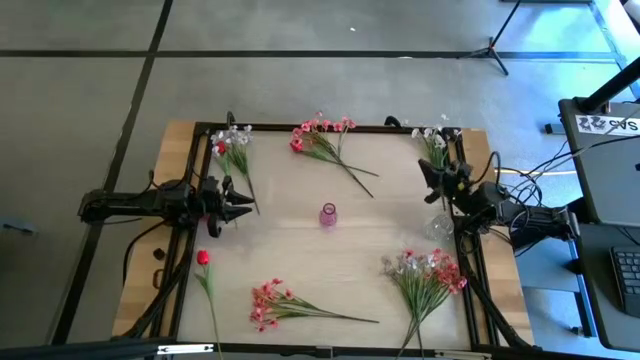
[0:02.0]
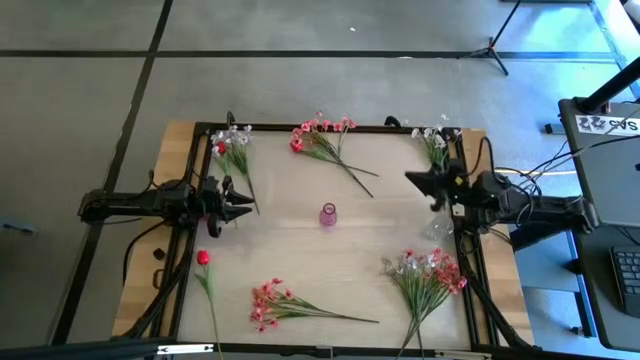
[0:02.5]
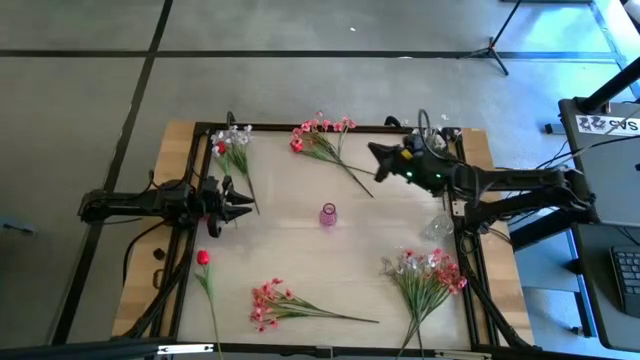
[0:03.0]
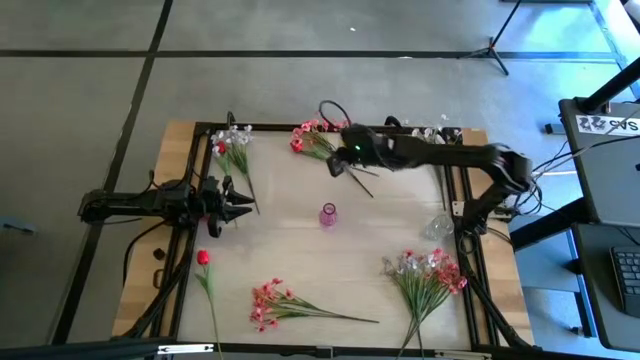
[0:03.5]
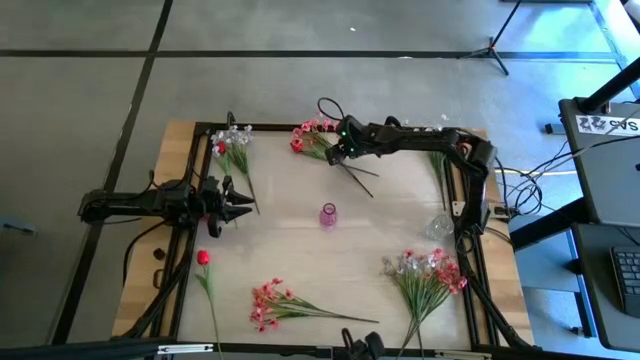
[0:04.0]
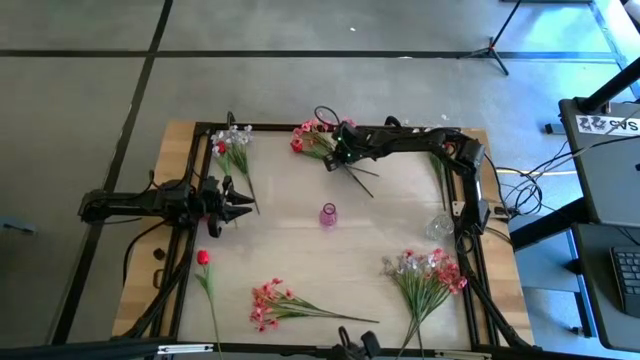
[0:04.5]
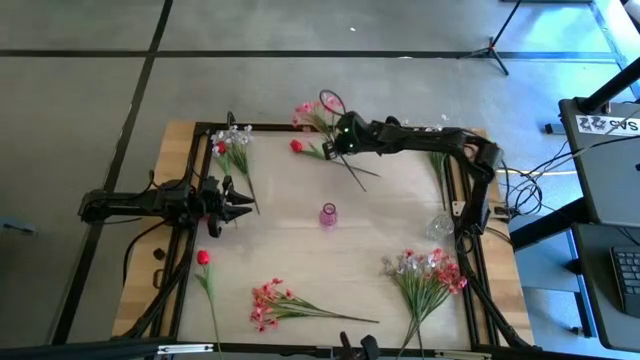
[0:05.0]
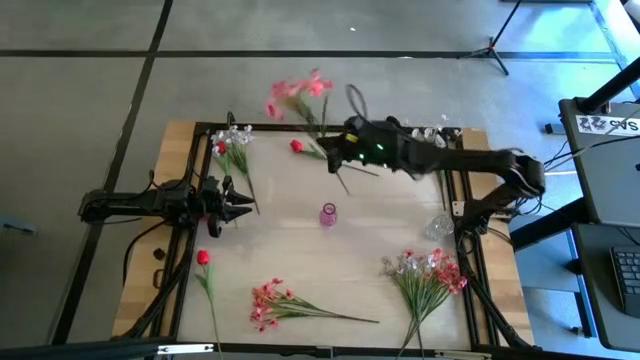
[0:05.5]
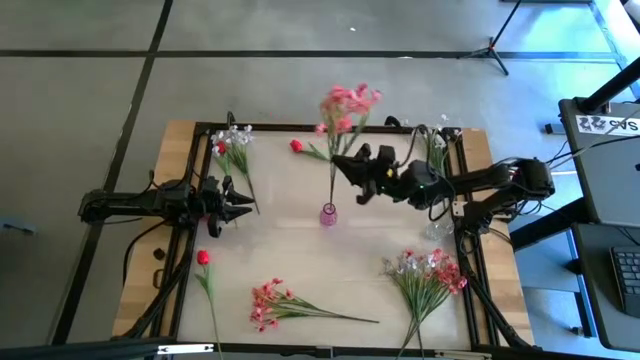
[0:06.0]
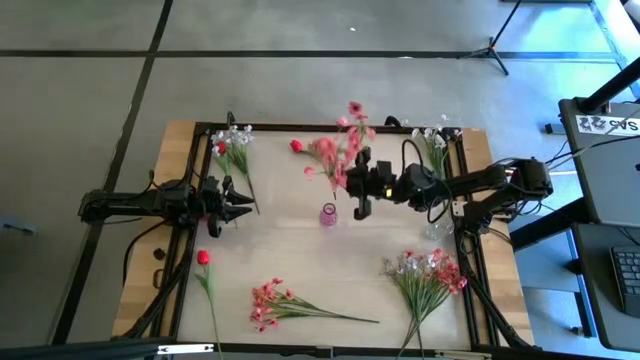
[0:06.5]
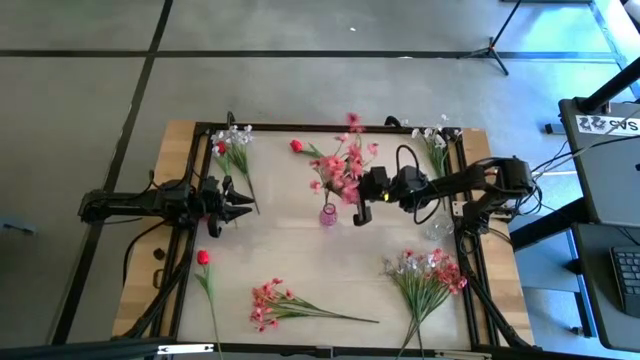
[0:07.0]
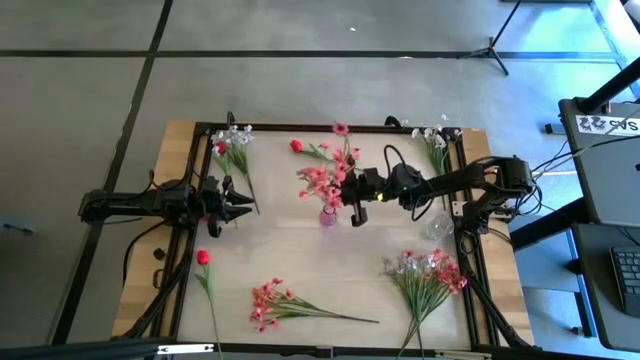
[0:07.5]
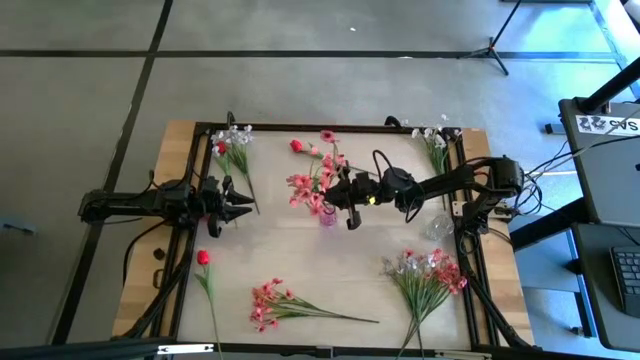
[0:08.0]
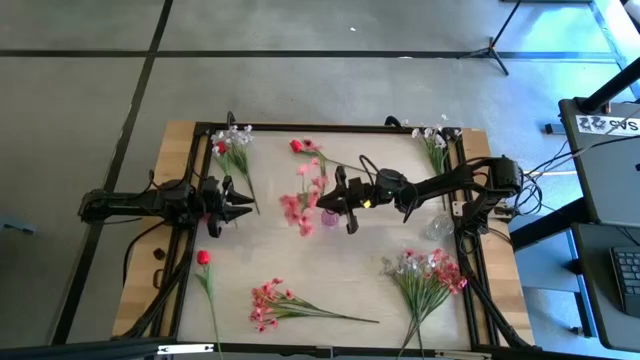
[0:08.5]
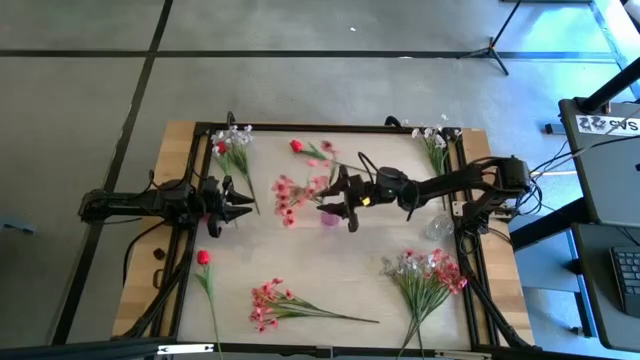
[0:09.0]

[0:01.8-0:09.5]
Task: Sort flowers into vase by color
Put the top pink flowers into the violet vase

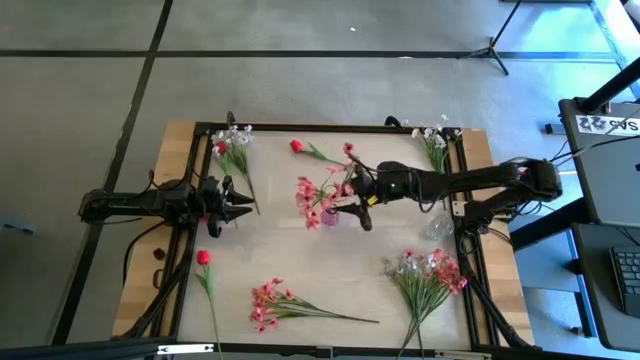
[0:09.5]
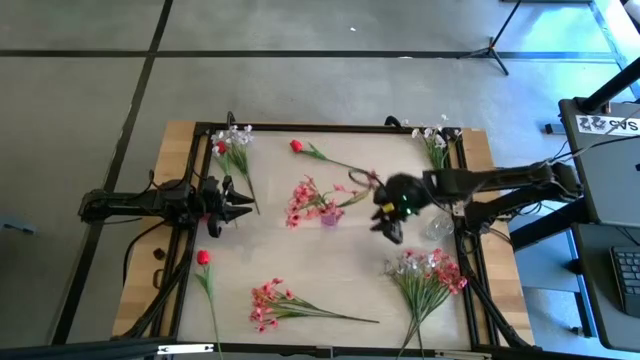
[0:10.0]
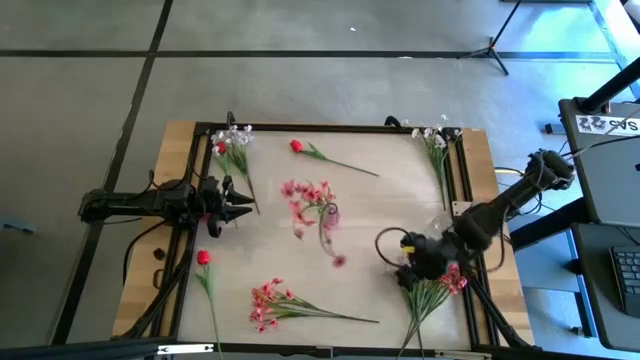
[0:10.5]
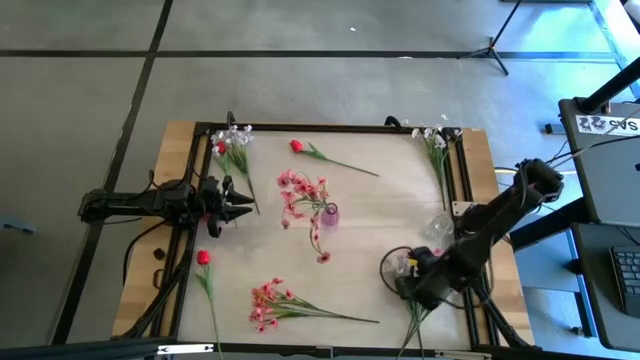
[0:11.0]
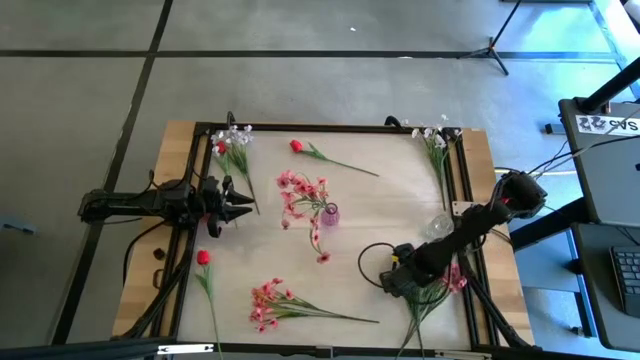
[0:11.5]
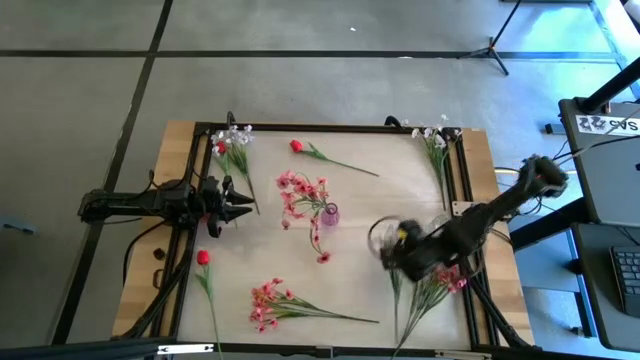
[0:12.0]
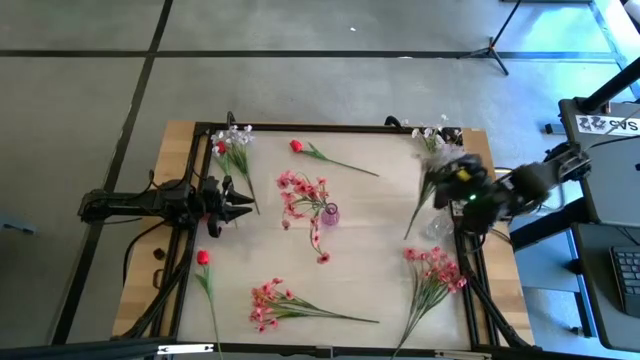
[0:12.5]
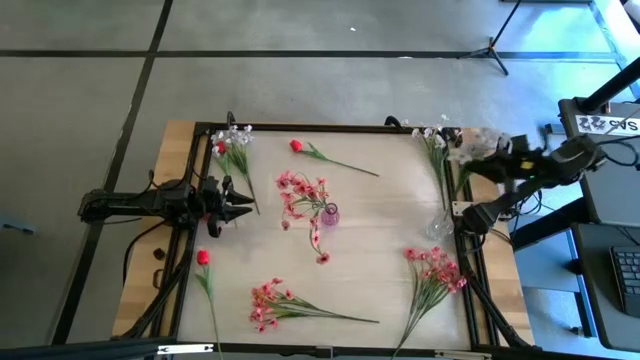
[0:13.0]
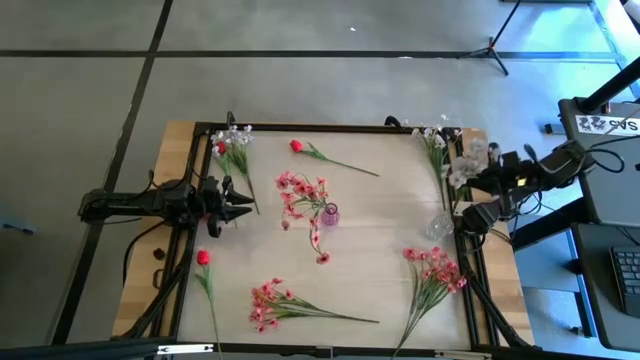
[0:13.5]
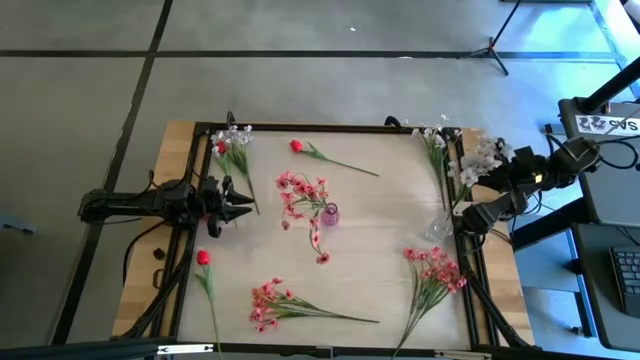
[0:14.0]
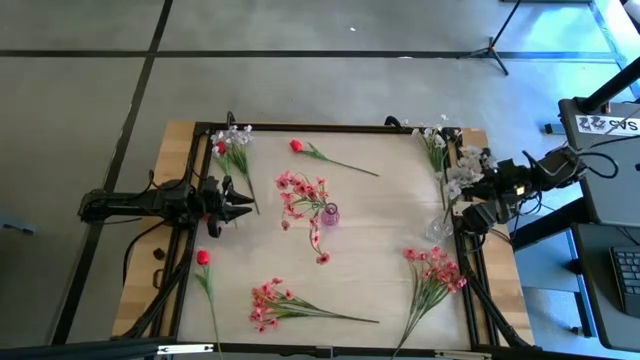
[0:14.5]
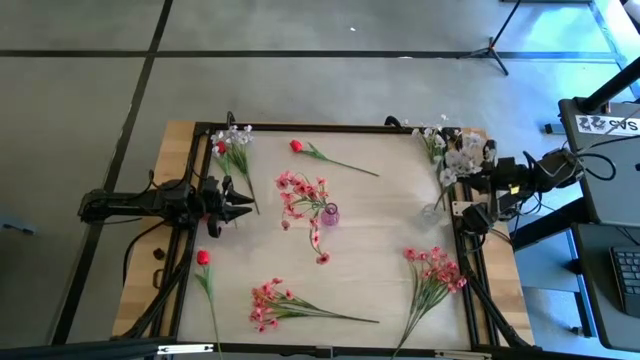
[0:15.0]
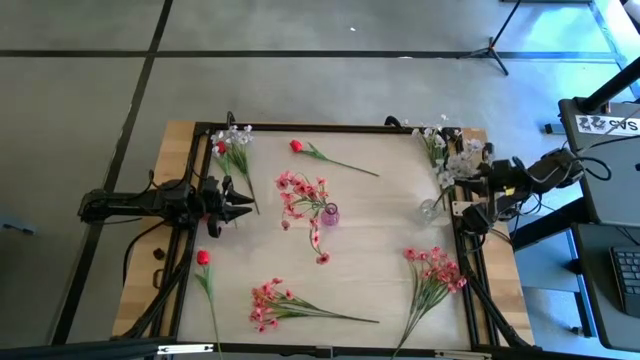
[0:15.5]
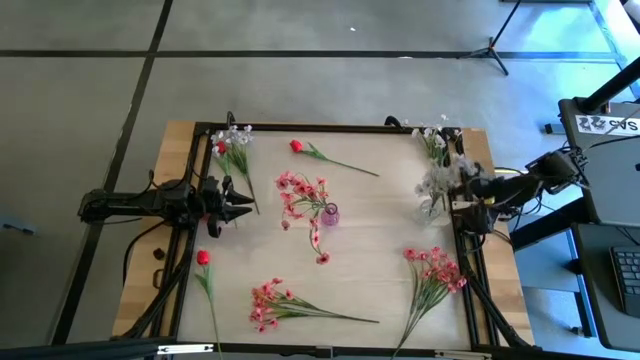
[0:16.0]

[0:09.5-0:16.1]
Put the bottom white flowers into the transparent vase

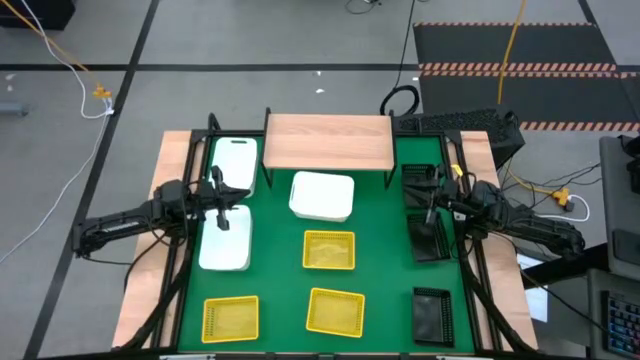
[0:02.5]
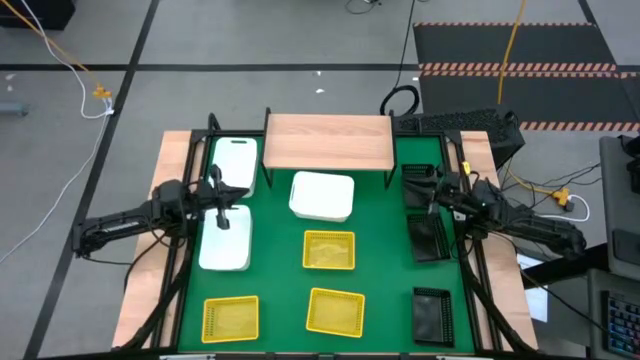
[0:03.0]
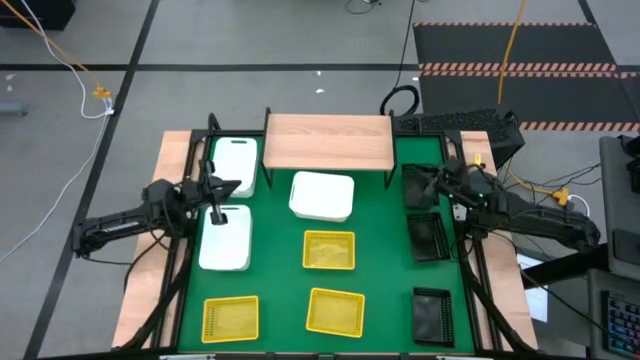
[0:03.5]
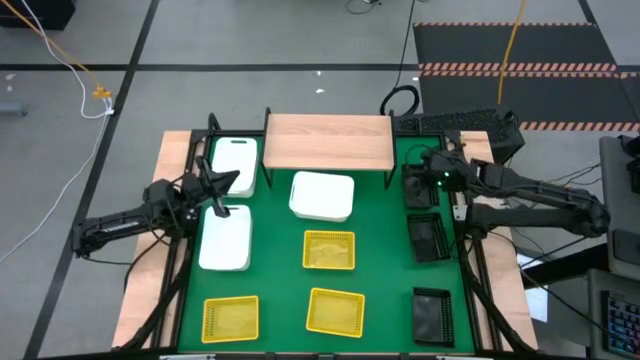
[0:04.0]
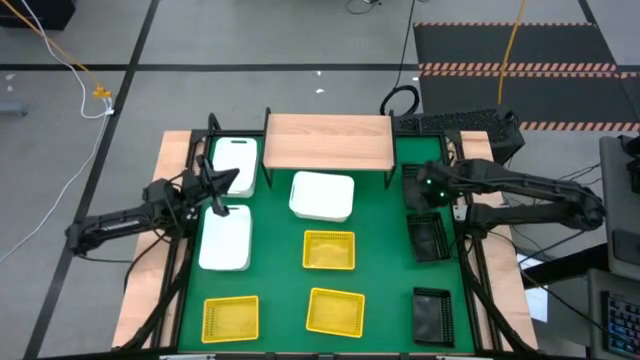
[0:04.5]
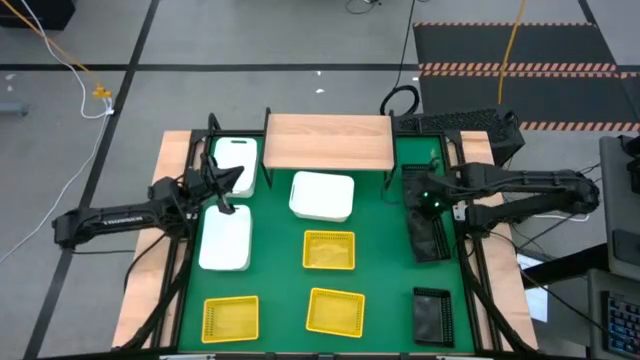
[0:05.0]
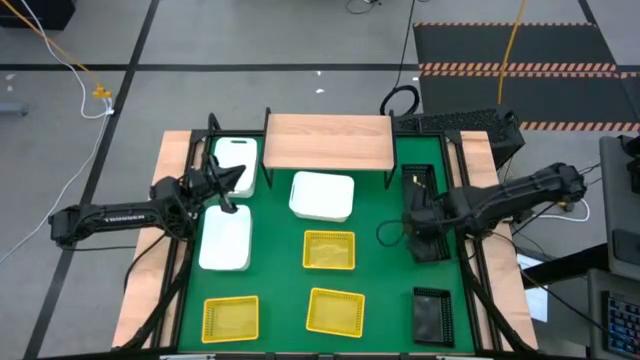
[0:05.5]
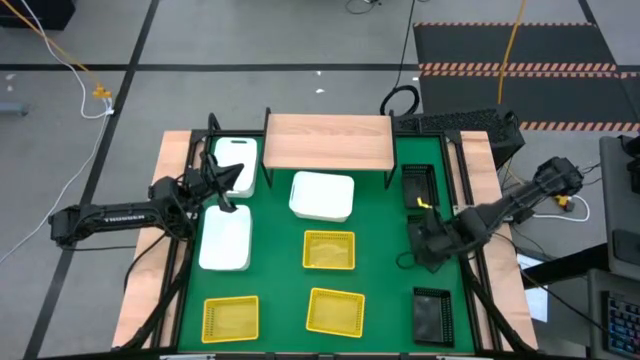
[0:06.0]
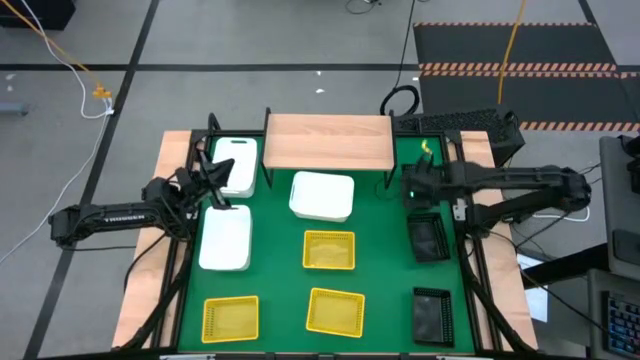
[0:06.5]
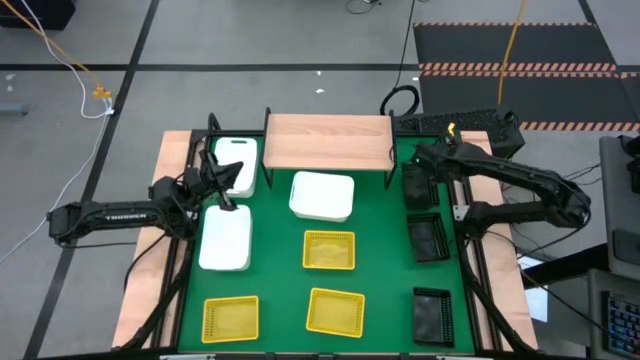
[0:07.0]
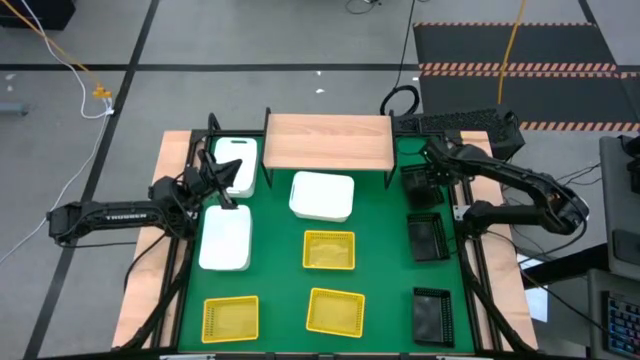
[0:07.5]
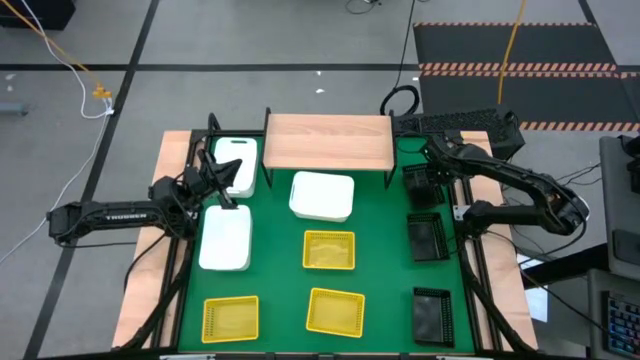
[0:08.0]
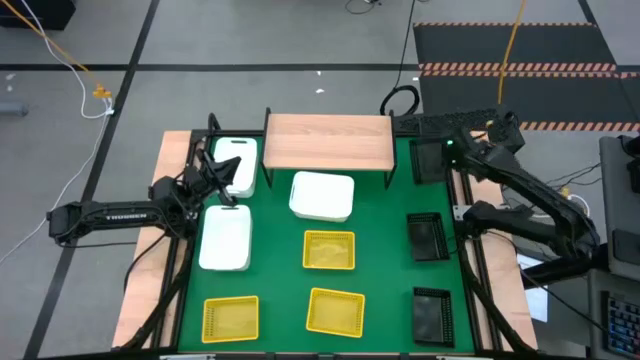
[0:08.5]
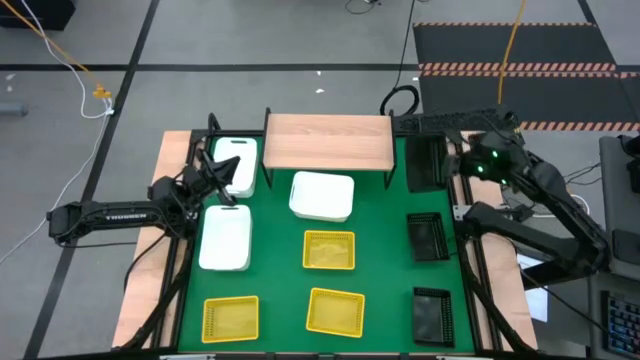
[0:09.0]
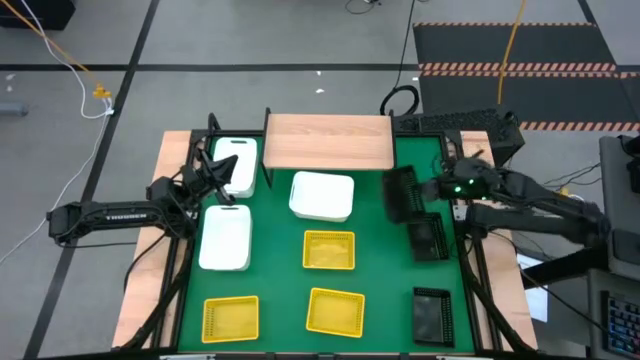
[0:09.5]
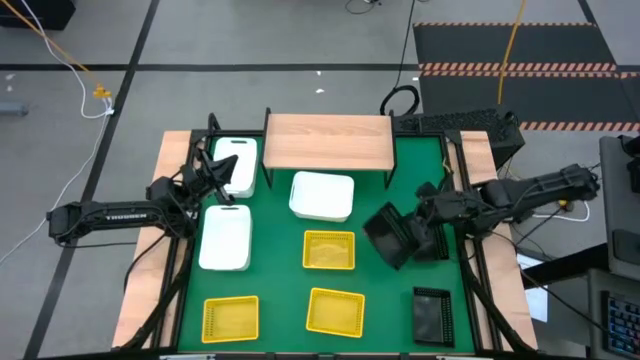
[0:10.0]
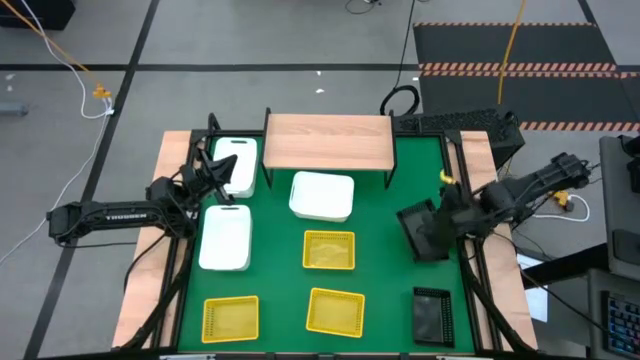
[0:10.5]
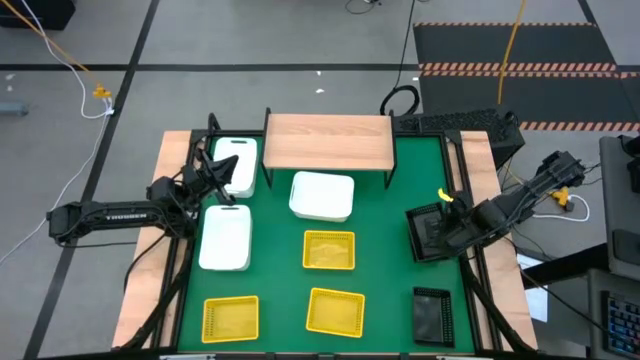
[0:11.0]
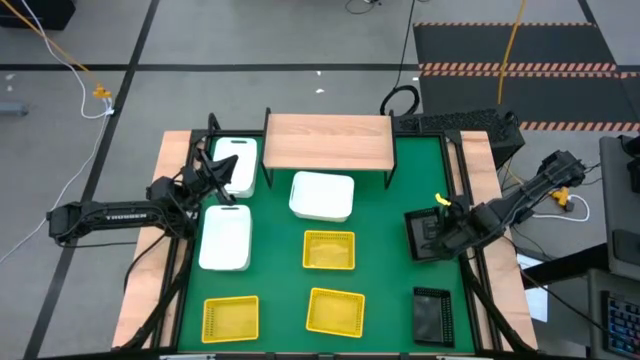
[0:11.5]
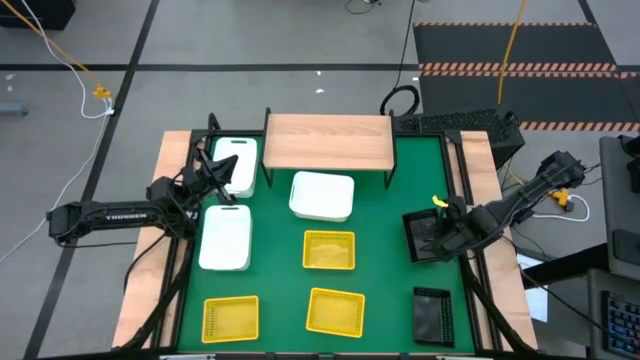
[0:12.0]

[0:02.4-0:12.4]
Task: Stack baskets on shelf by color
Stack the top black bin on the middle black bin
